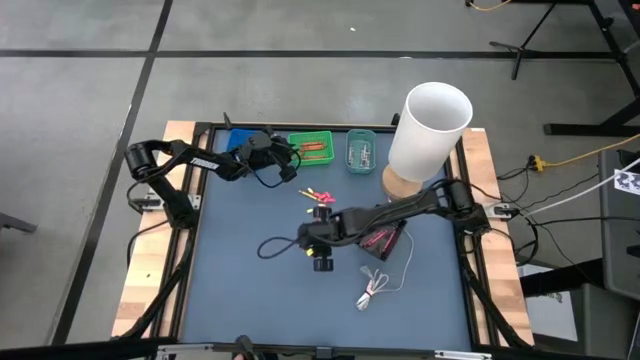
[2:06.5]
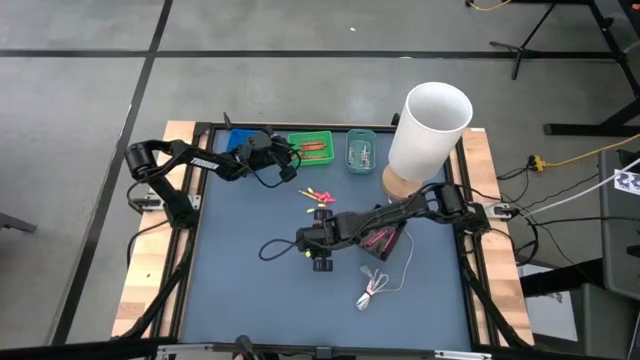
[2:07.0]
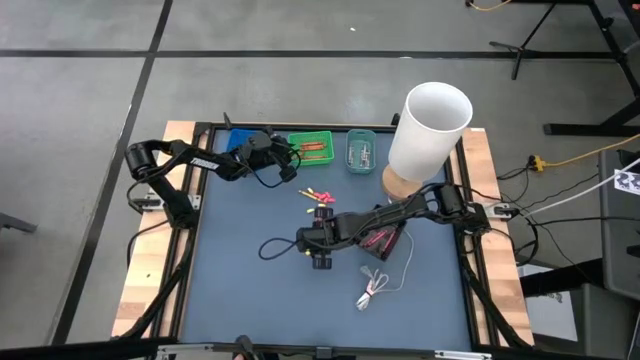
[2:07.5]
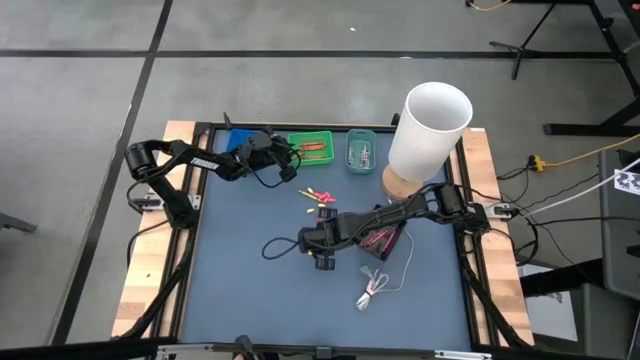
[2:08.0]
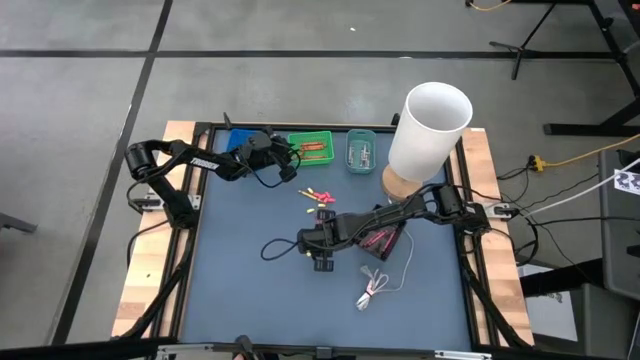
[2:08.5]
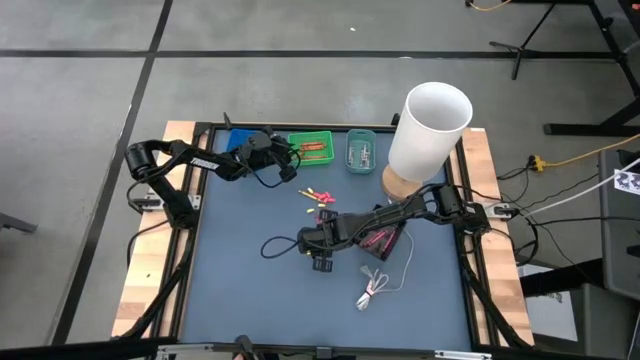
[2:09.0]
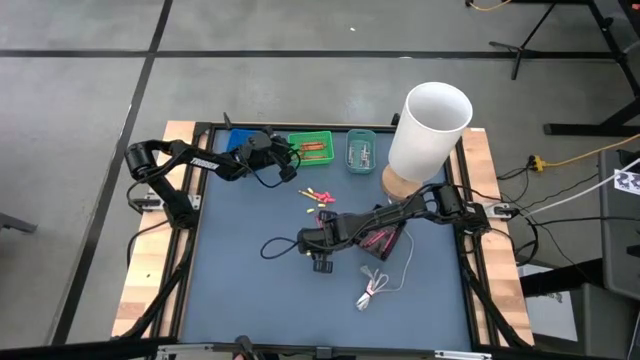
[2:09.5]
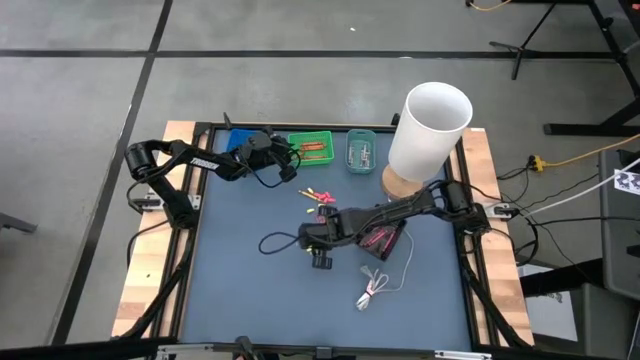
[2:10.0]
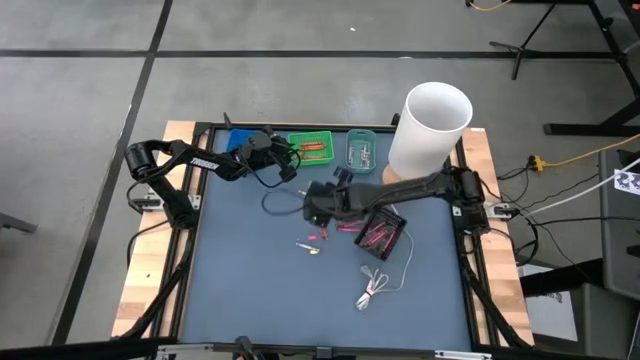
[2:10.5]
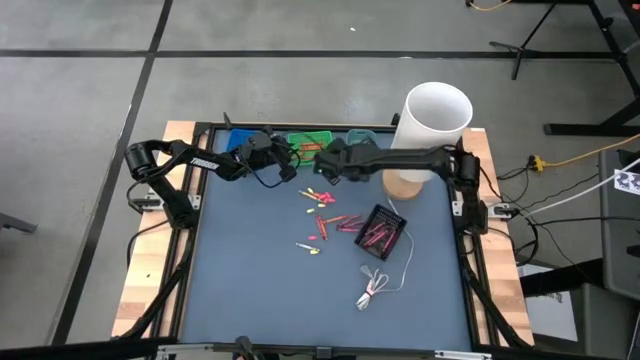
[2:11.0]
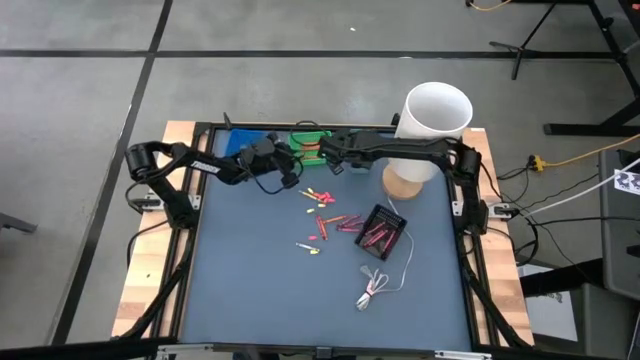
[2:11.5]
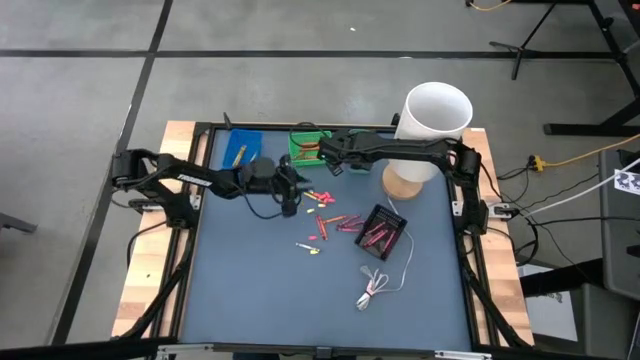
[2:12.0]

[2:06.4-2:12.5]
Task: Sort crayons
Put the gray crayon into the dark green bin

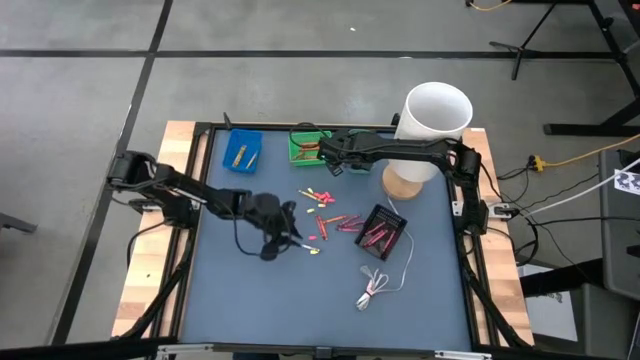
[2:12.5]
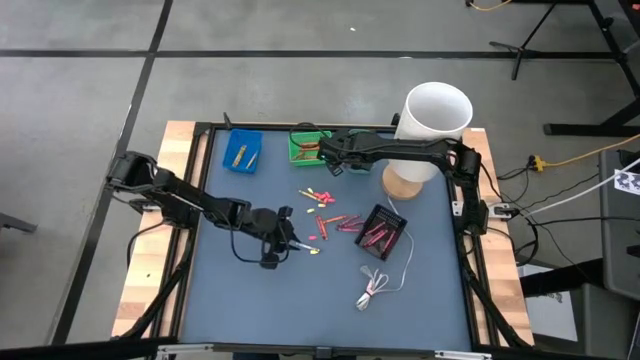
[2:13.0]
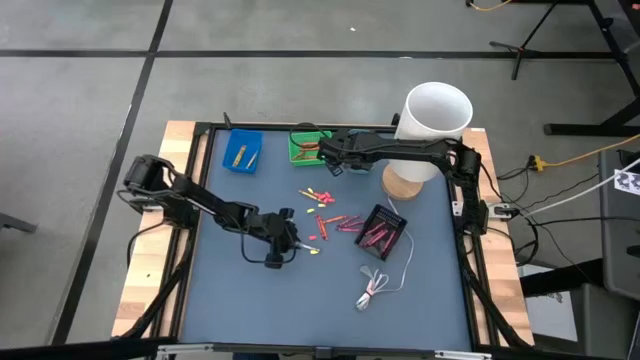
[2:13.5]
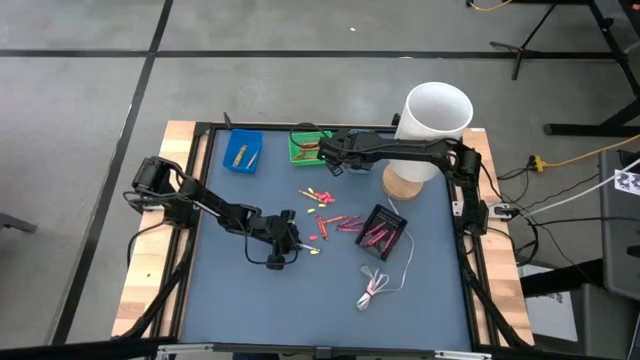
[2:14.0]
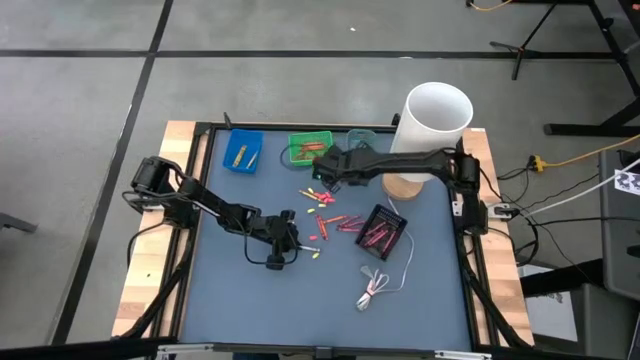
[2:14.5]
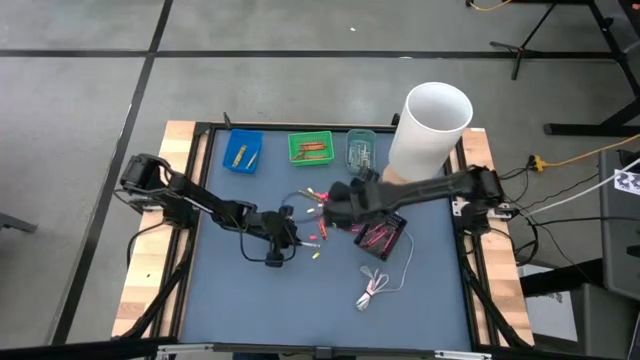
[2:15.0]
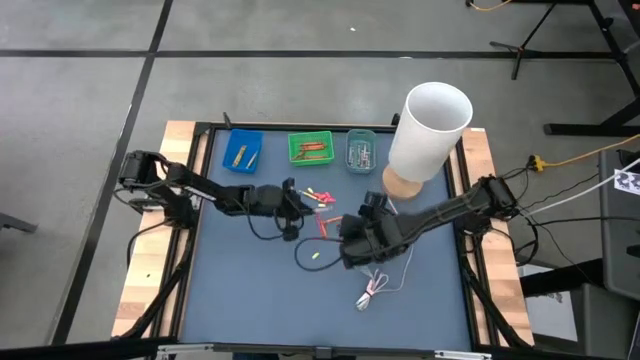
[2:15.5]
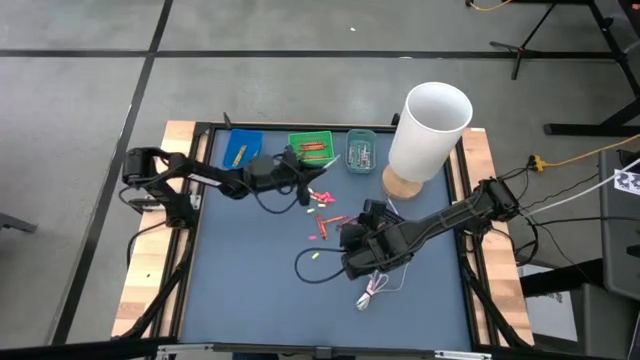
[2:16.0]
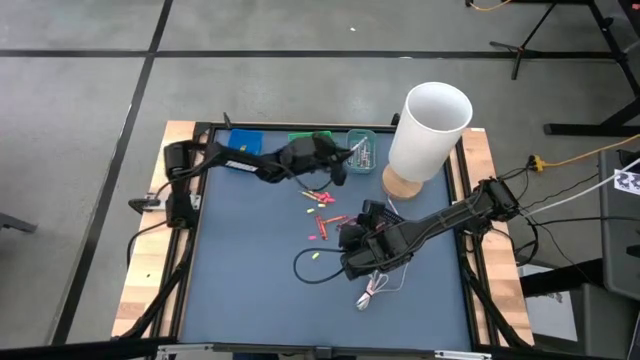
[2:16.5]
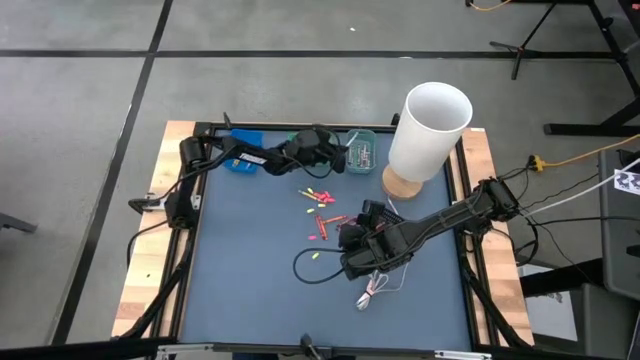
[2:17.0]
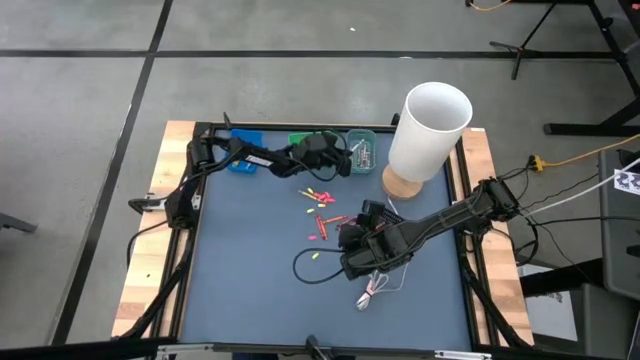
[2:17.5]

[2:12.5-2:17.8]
Put the gray crayon into the dark green bin

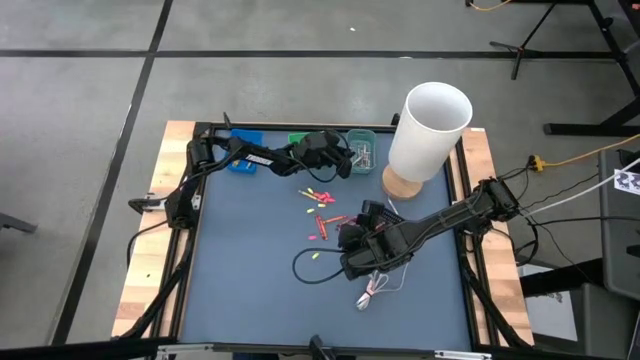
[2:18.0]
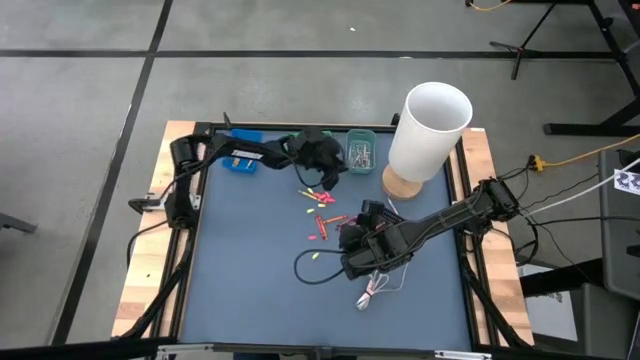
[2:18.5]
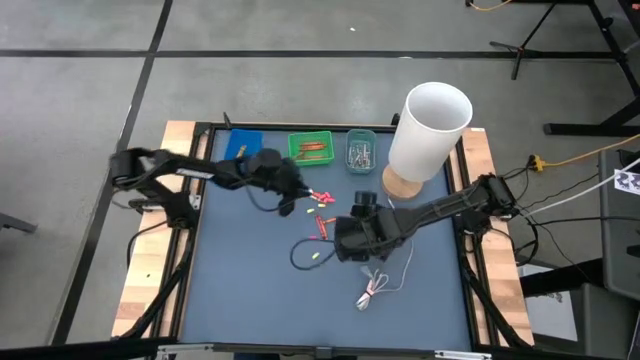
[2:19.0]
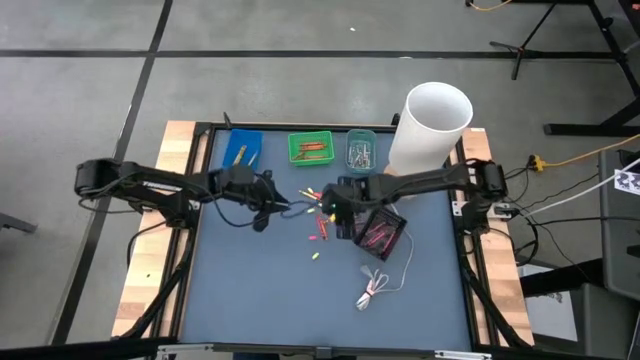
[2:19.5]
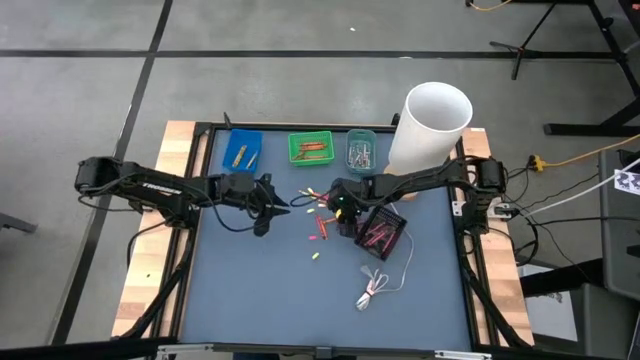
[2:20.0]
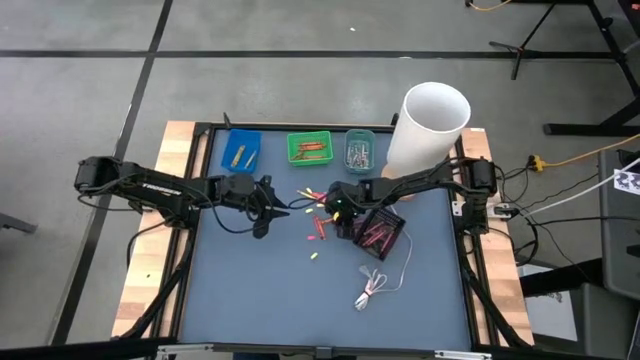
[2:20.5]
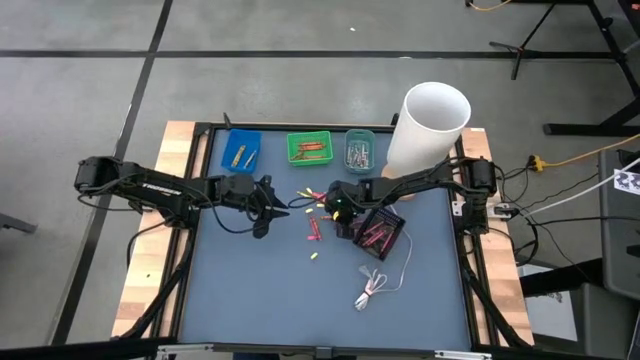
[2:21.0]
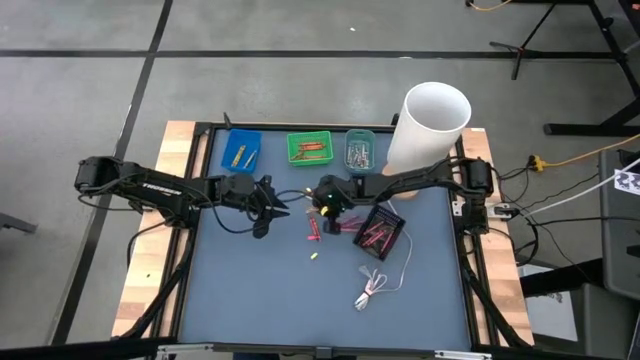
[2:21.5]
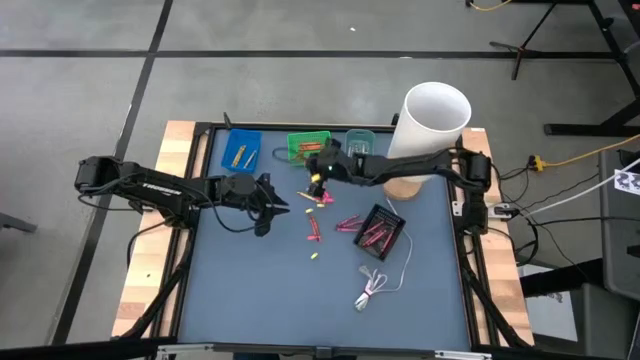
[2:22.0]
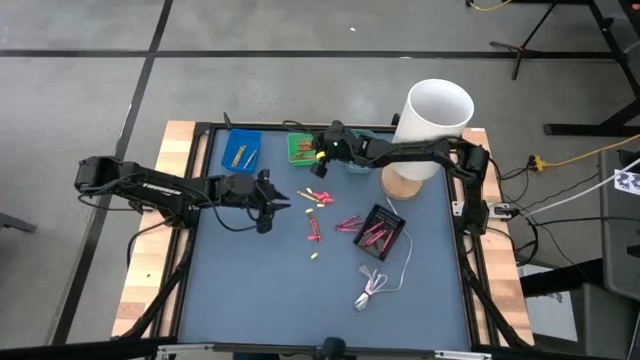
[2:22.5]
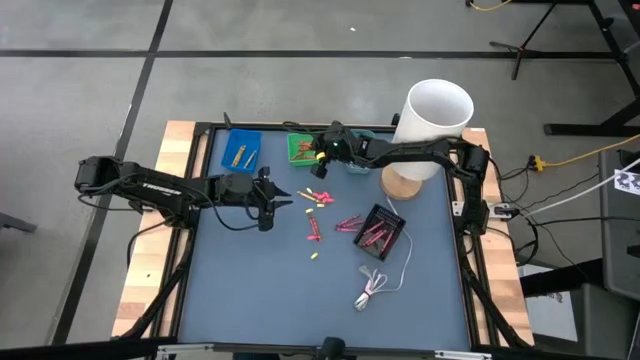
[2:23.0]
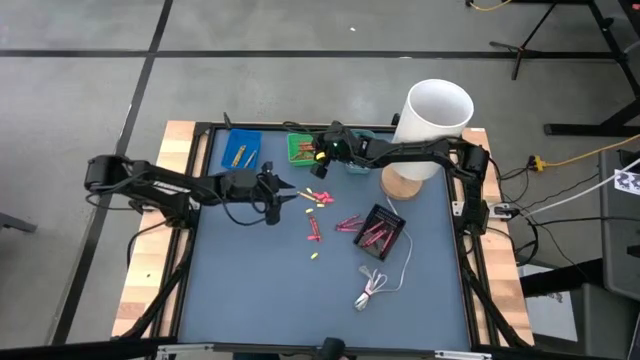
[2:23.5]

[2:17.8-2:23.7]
Put the orange crayon into the green bin

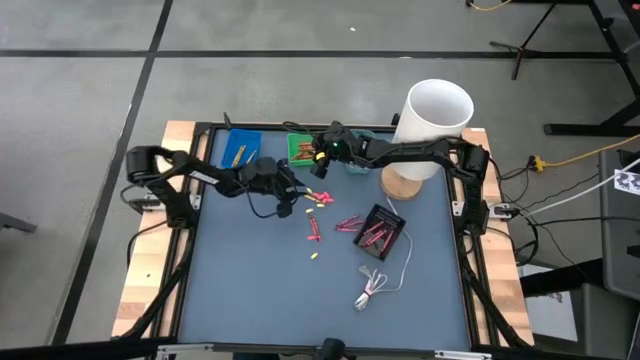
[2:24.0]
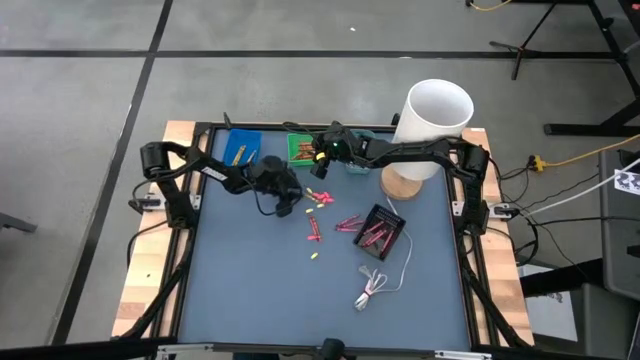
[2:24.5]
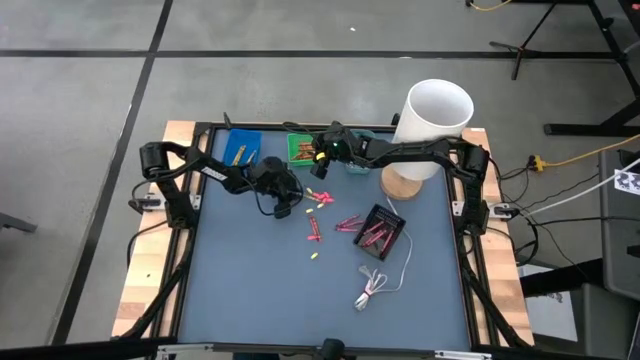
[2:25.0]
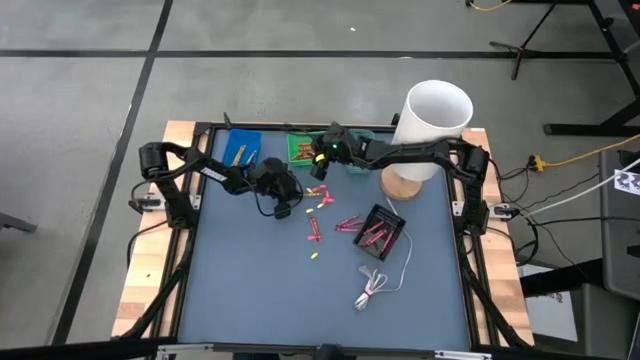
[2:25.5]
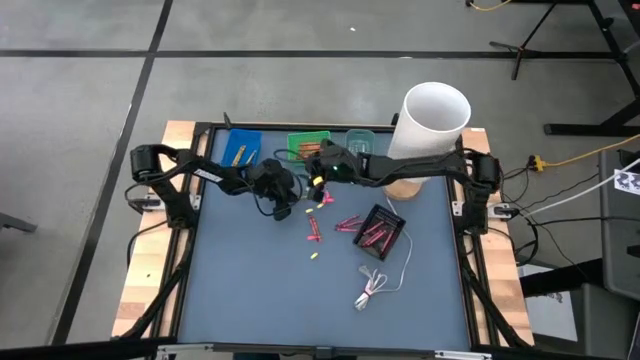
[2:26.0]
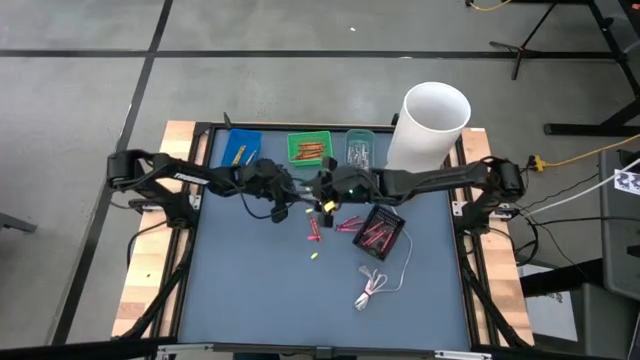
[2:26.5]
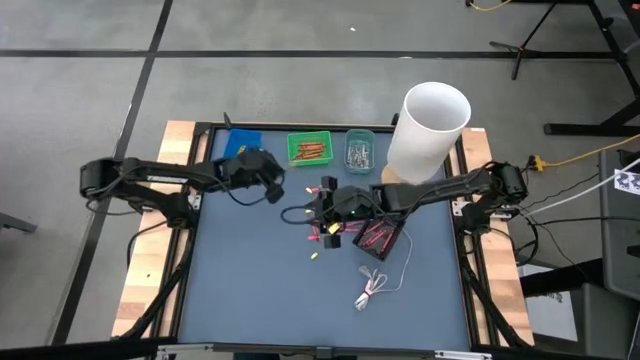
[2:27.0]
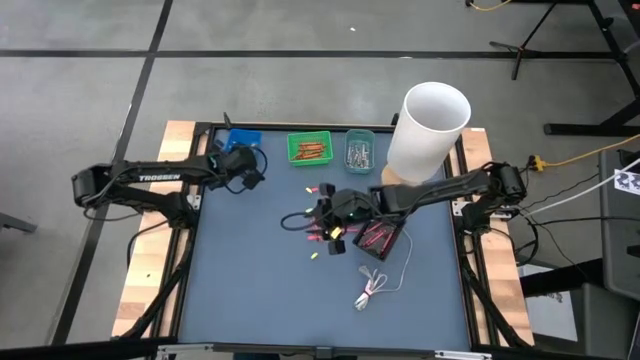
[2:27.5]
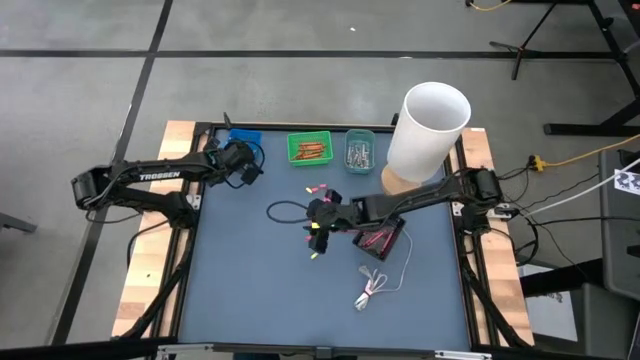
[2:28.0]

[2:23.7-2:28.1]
Put the yellow crayon into the blue bin
